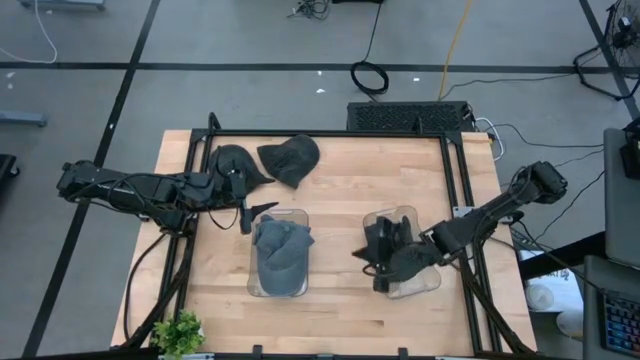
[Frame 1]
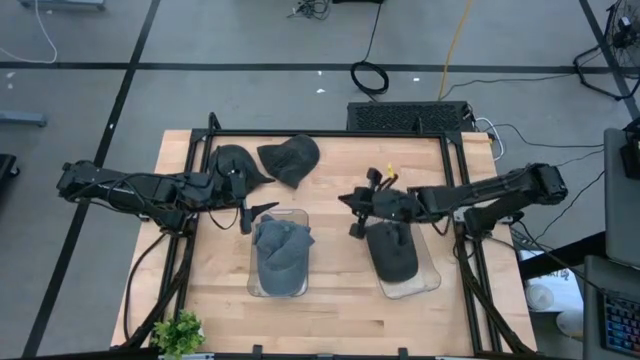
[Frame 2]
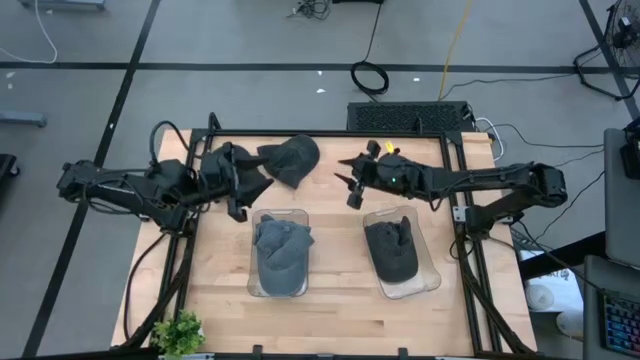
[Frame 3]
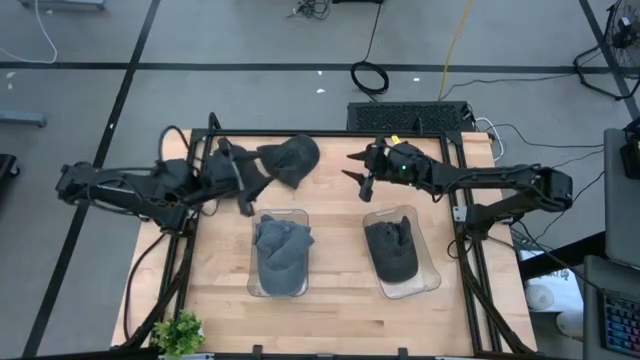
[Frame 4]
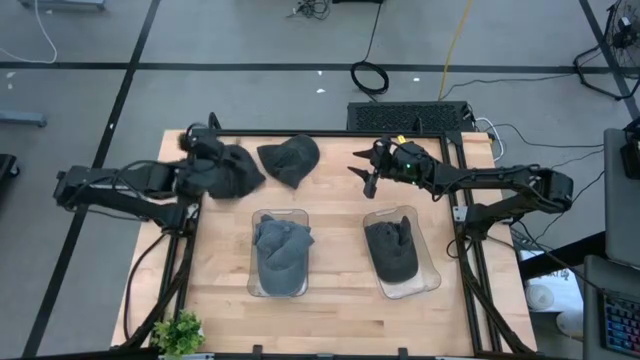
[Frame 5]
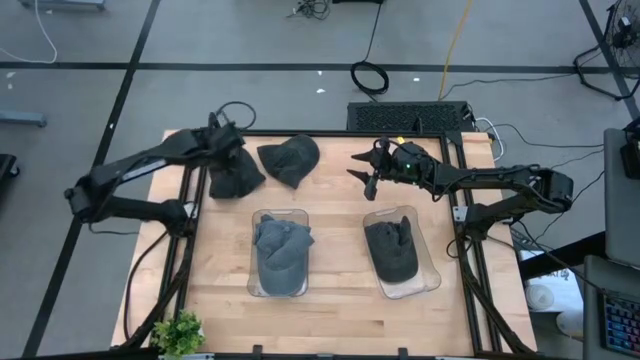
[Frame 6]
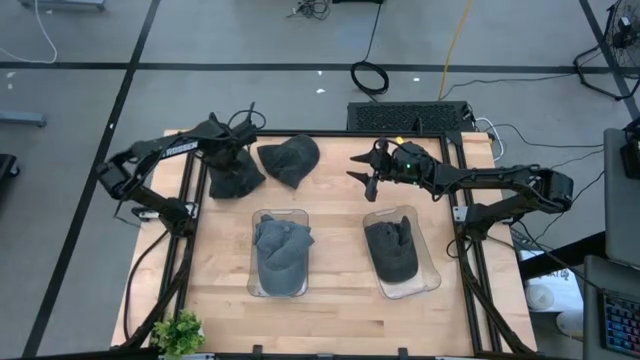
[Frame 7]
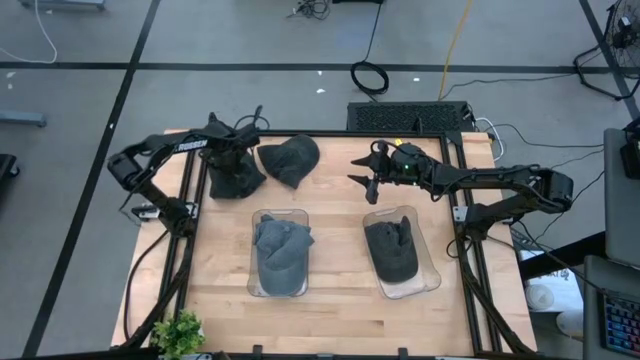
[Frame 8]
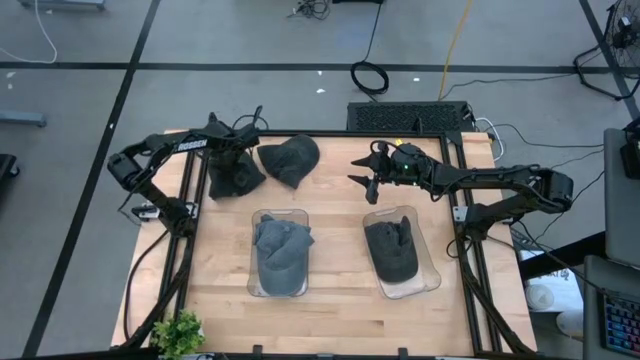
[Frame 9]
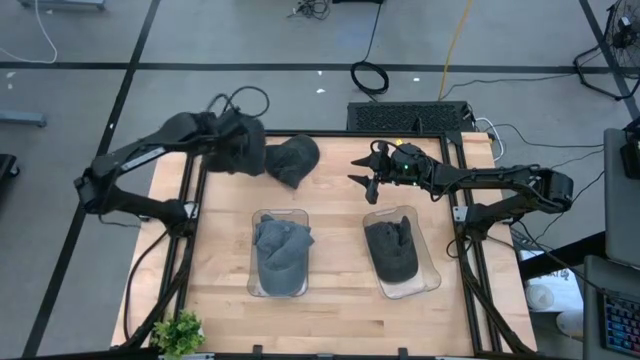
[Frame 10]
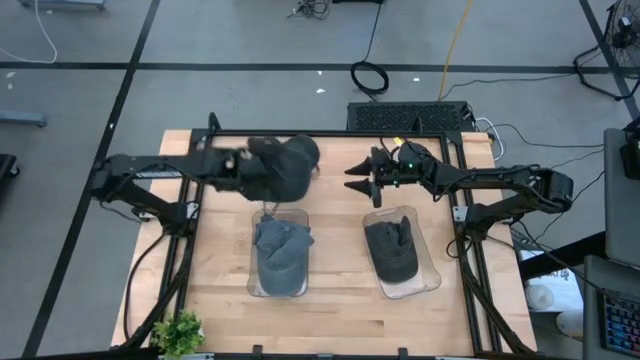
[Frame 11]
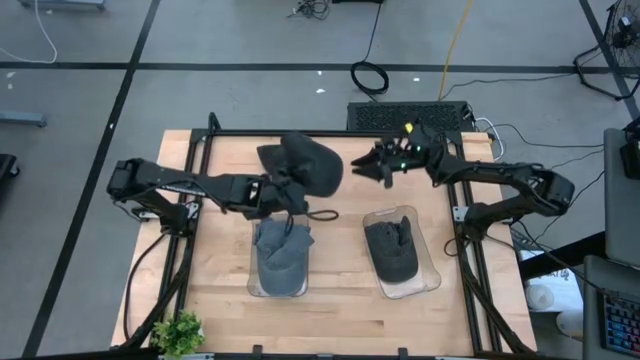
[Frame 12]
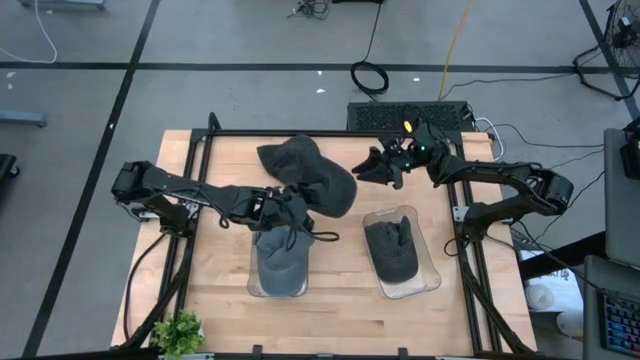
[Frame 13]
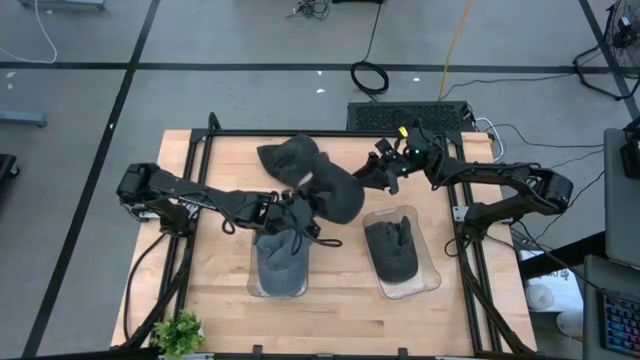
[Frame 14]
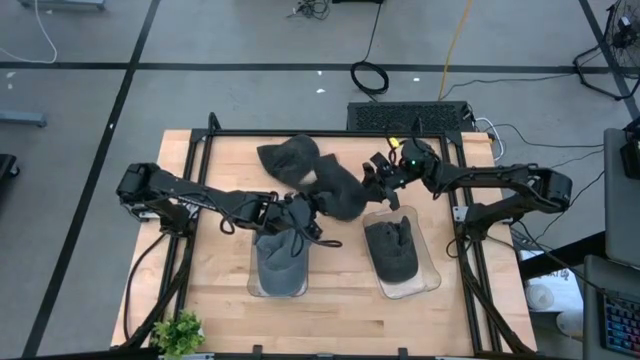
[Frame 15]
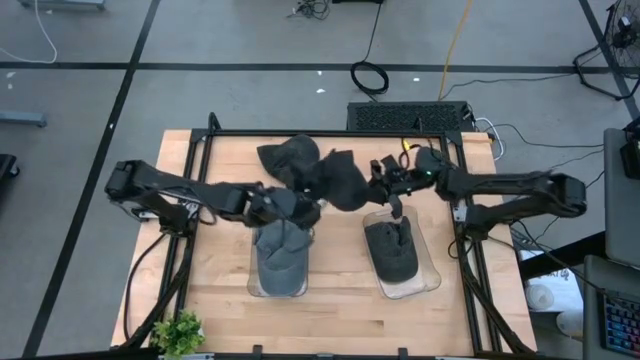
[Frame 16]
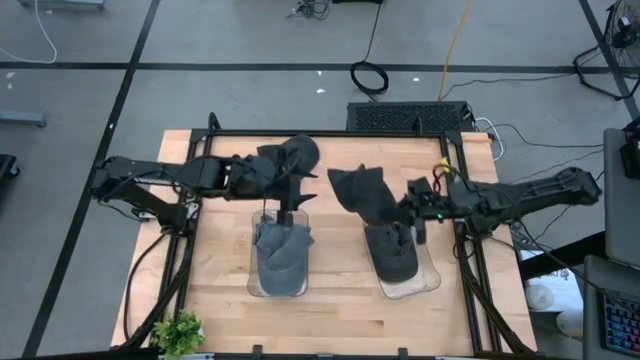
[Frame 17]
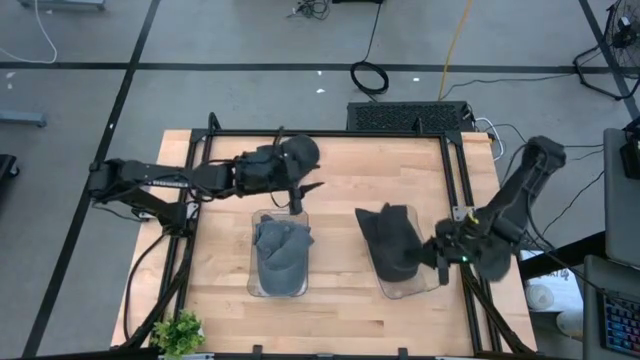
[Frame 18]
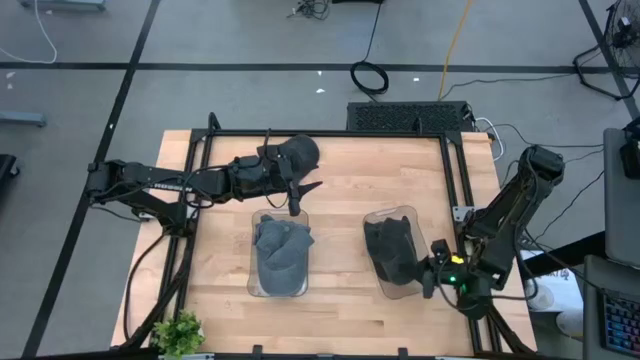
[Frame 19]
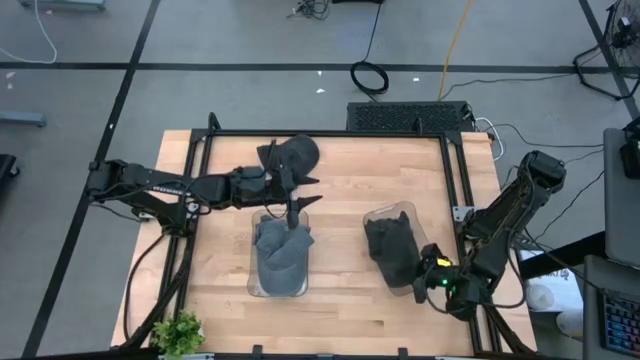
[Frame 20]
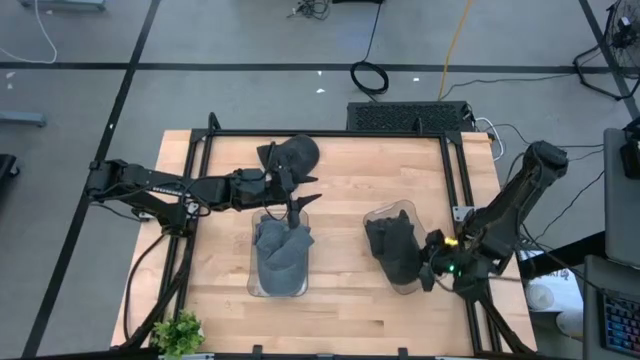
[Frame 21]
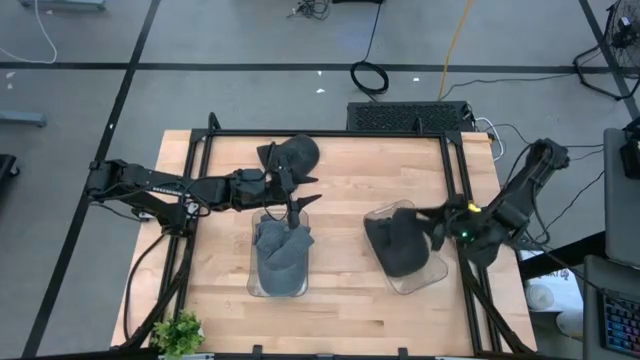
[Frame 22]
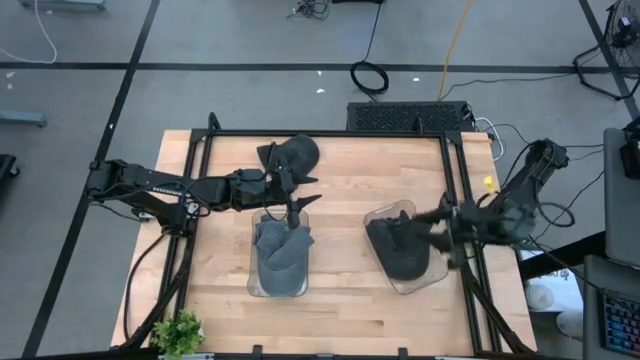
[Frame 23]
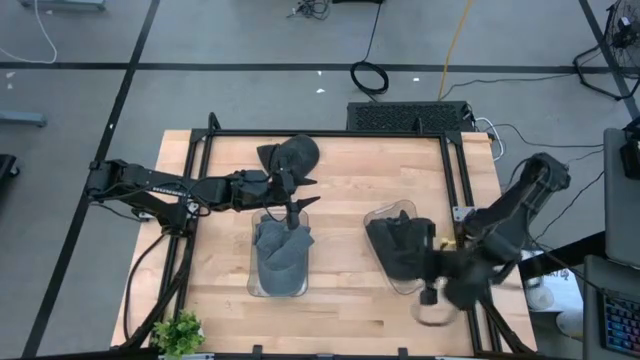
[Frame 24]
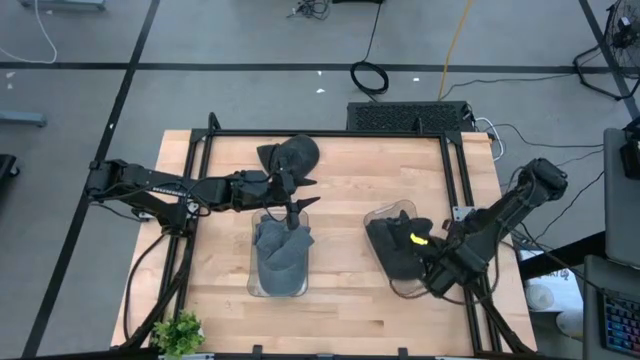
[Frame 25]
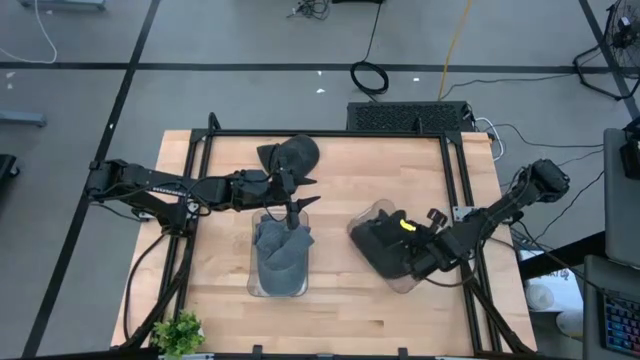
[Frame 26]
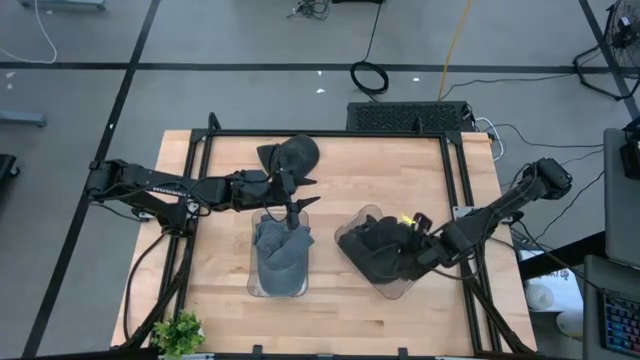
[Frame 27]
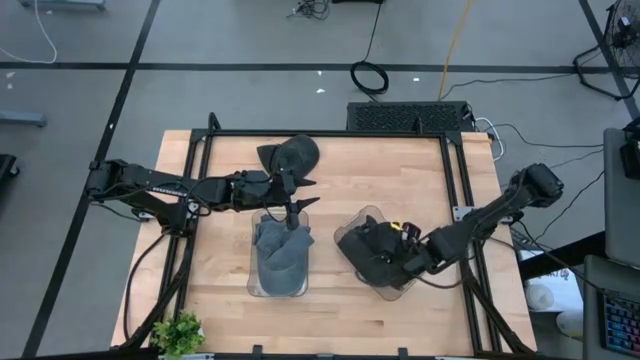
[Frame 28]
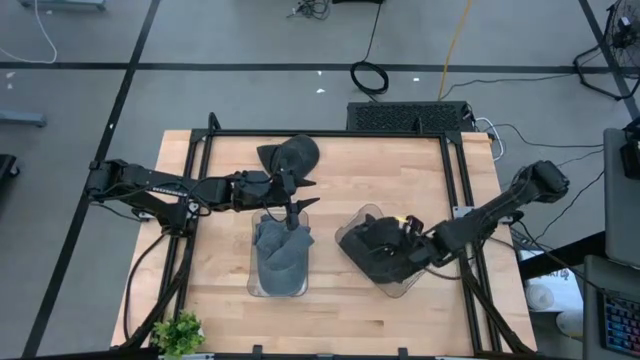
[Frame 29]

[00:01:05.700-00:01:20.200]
Task: Pick & Place hat
Put the left black cap into the right transparent bin

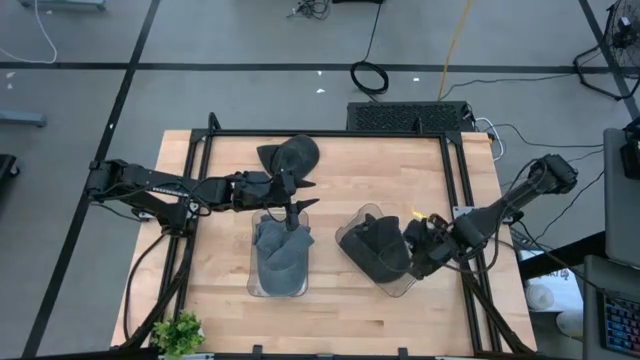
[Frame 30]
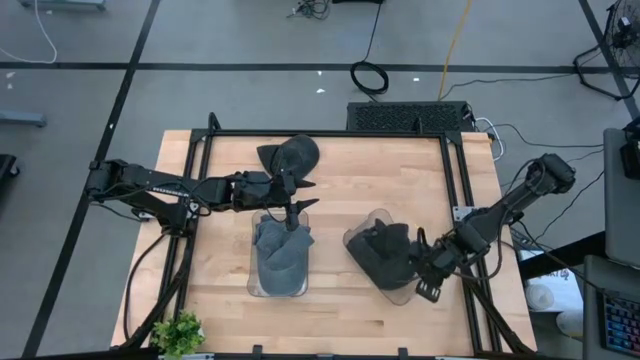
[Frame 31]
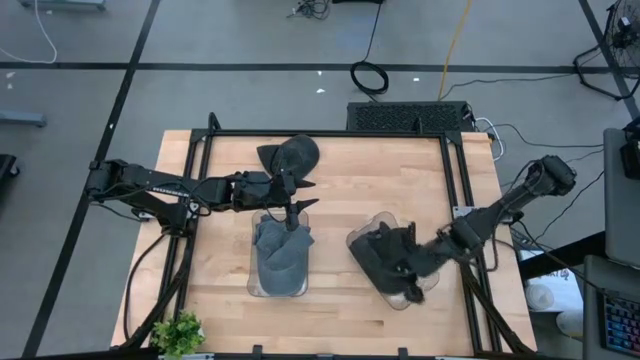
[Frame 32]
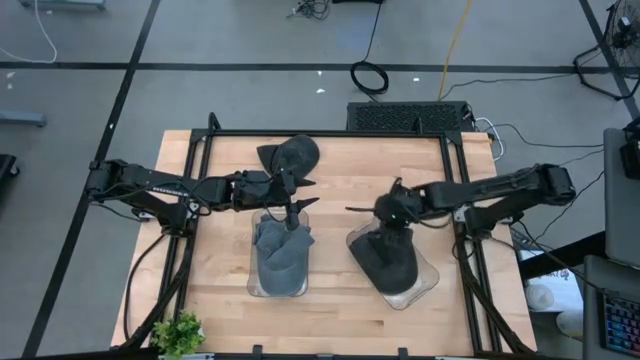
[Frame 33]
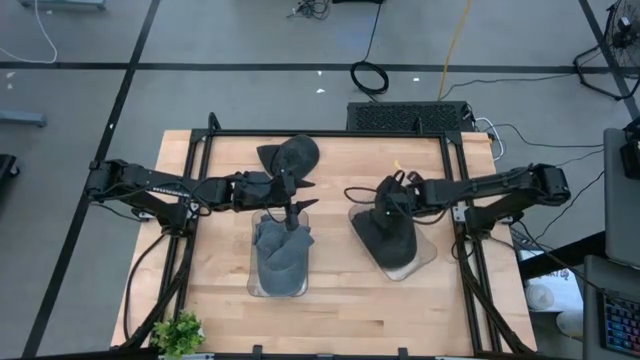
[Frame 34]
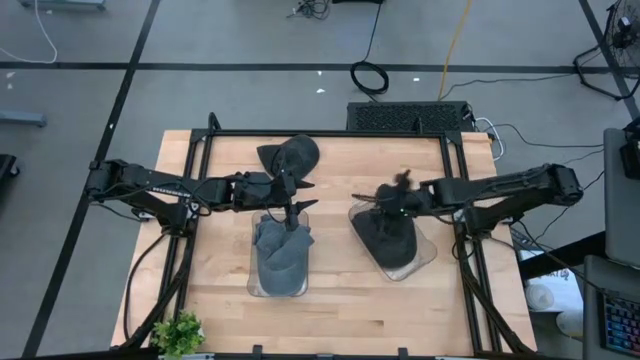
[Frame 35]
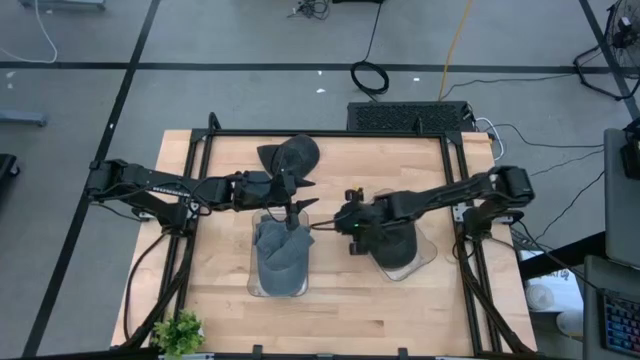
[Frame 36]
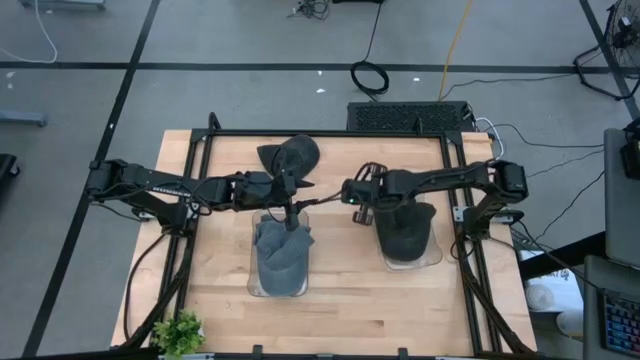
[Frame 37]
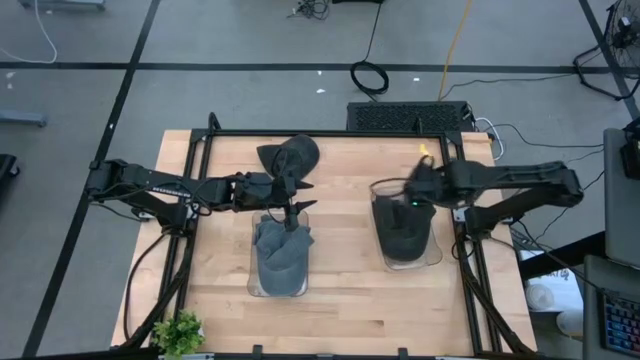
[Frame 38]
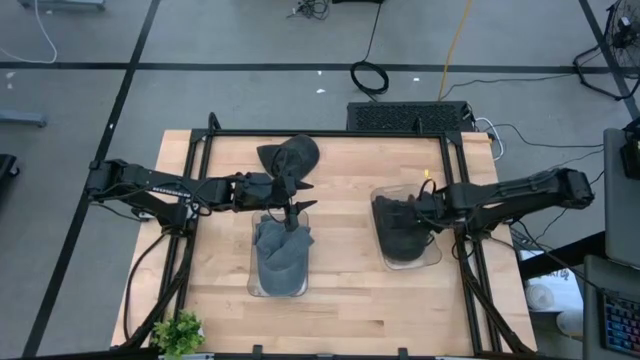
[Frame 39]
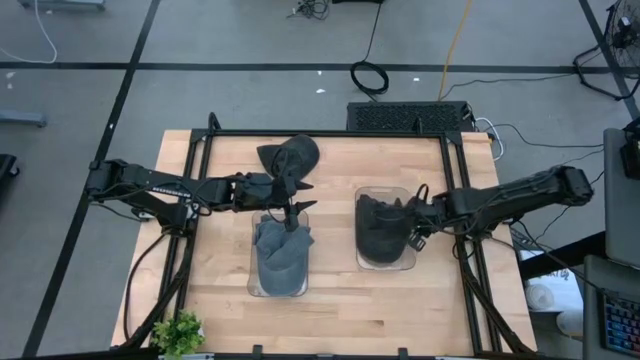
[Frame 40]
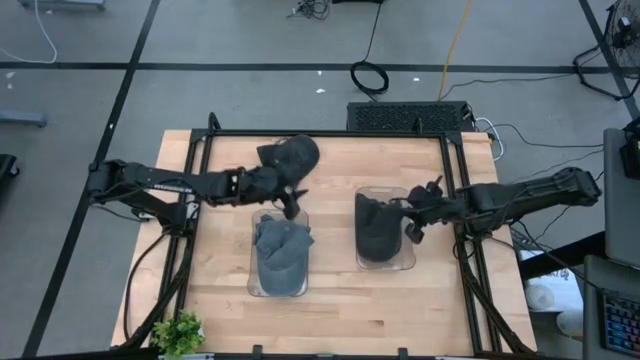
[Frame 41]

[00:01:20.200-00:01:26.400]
Adjust the right transparent bin on the table
